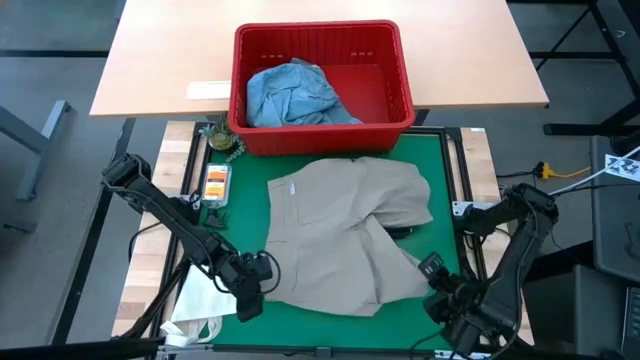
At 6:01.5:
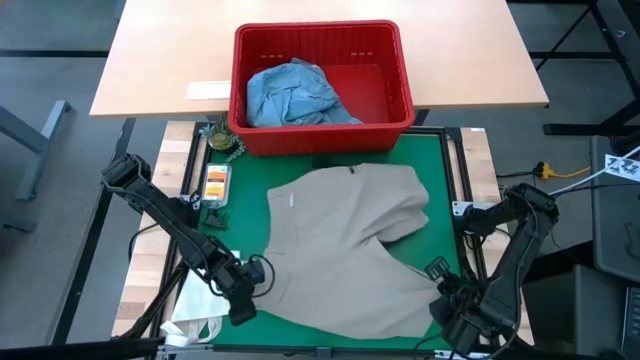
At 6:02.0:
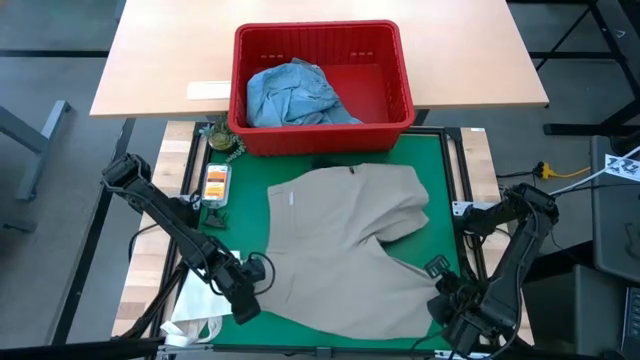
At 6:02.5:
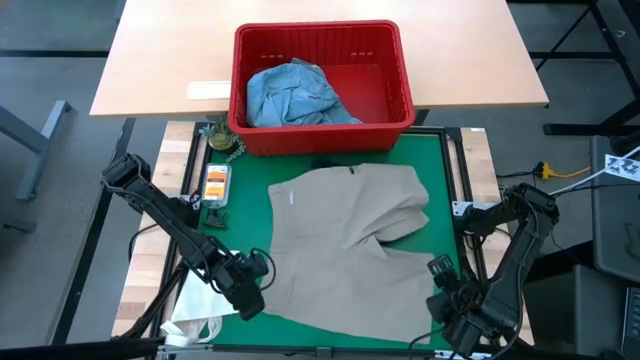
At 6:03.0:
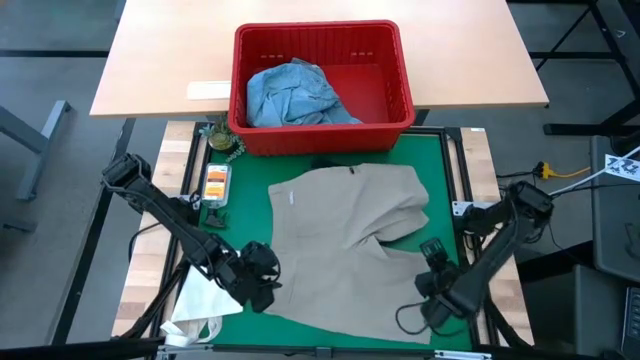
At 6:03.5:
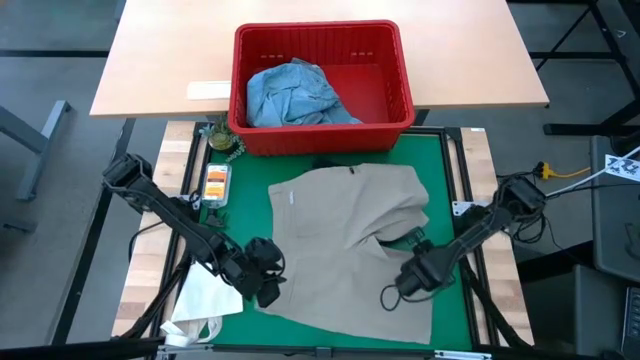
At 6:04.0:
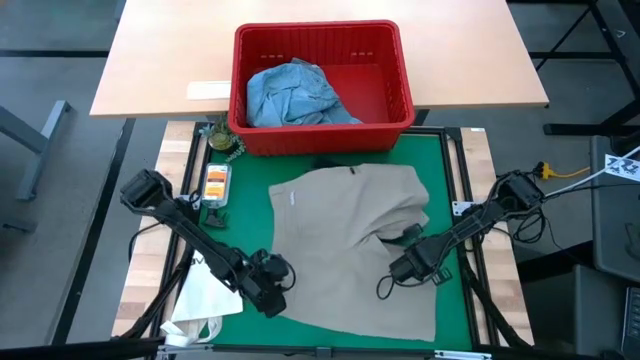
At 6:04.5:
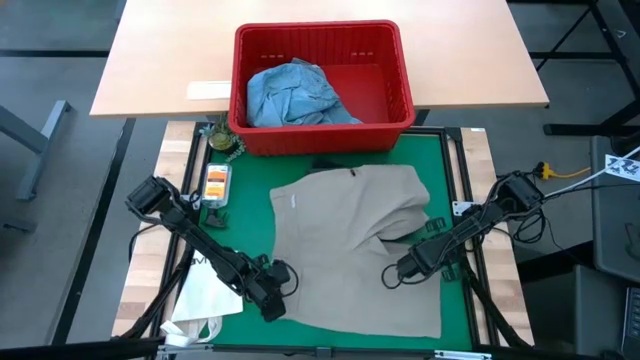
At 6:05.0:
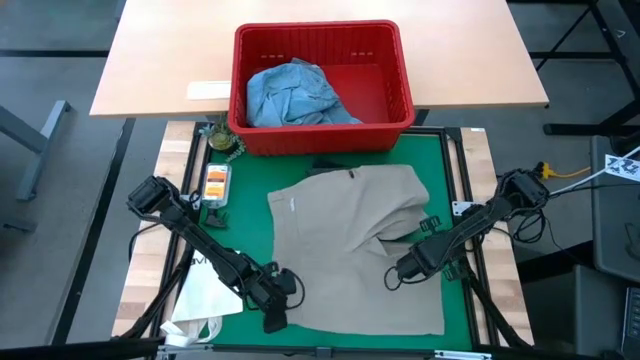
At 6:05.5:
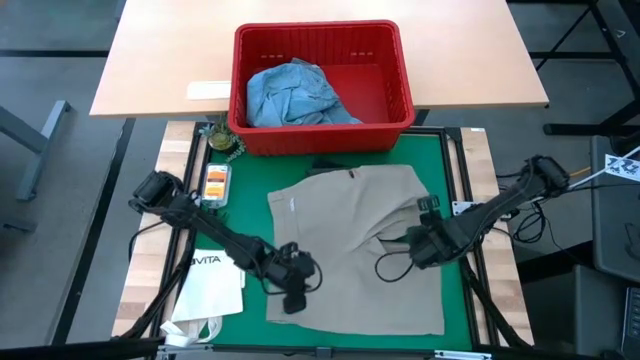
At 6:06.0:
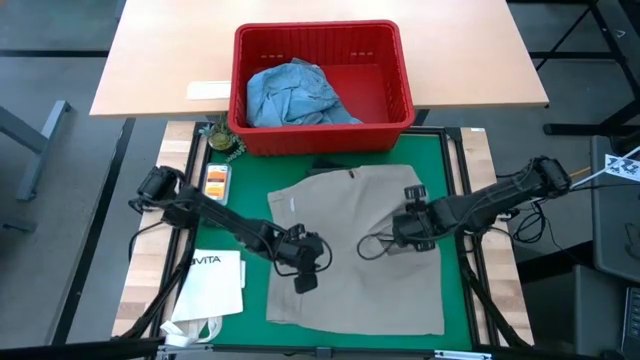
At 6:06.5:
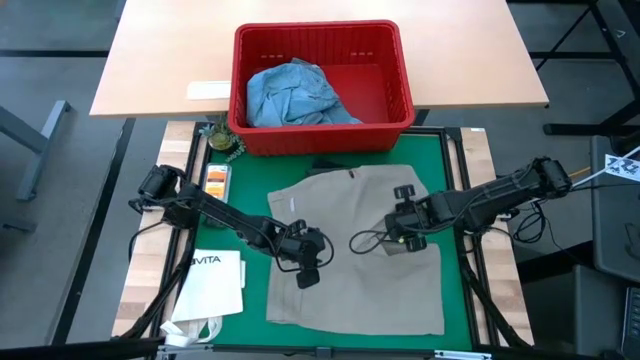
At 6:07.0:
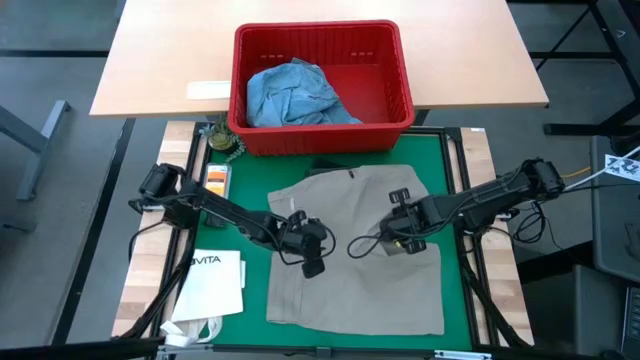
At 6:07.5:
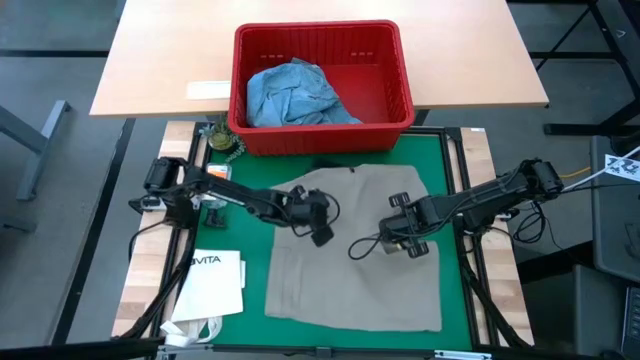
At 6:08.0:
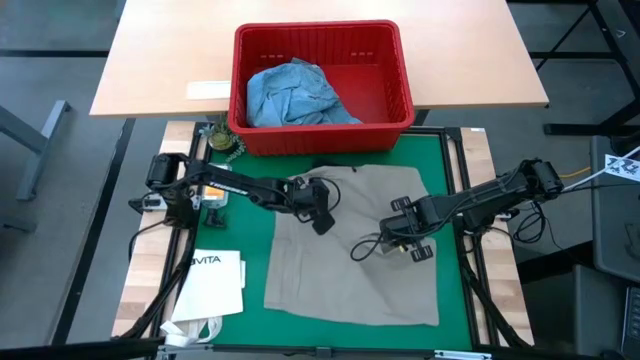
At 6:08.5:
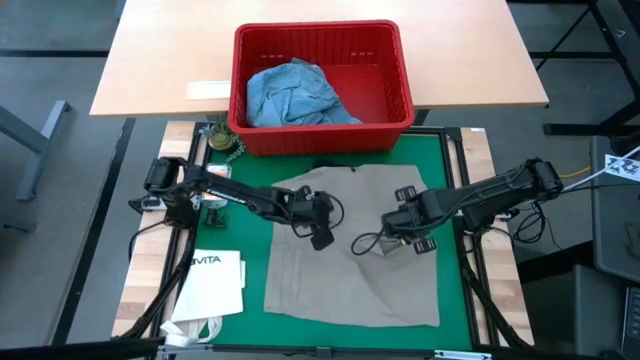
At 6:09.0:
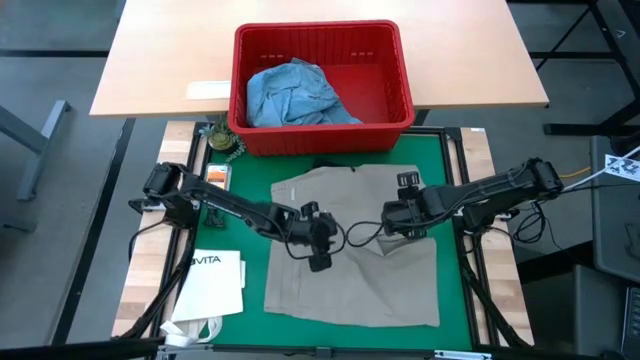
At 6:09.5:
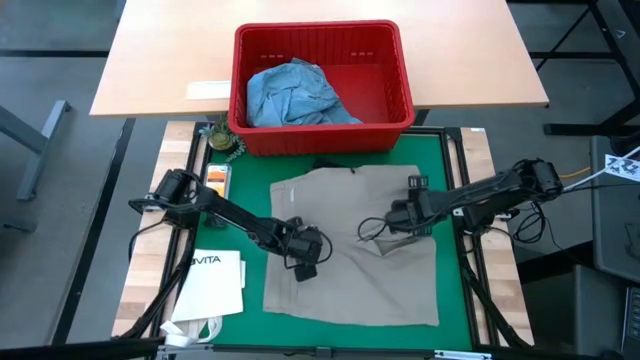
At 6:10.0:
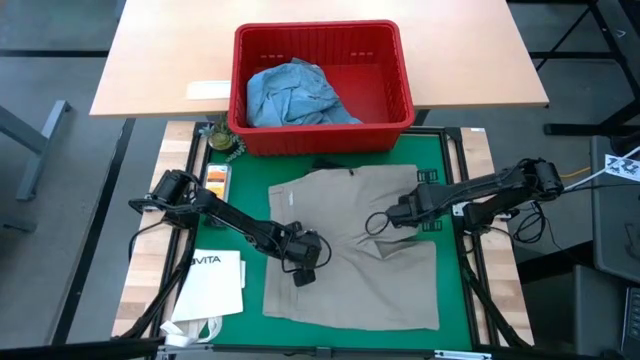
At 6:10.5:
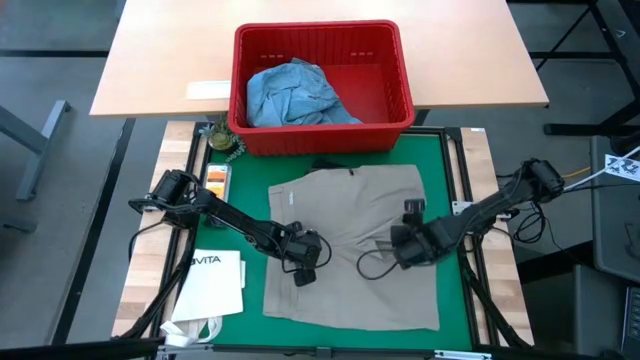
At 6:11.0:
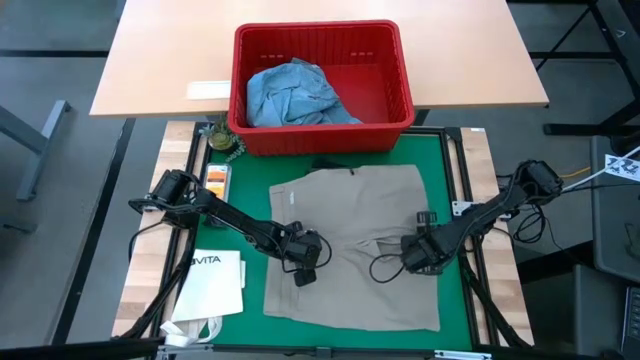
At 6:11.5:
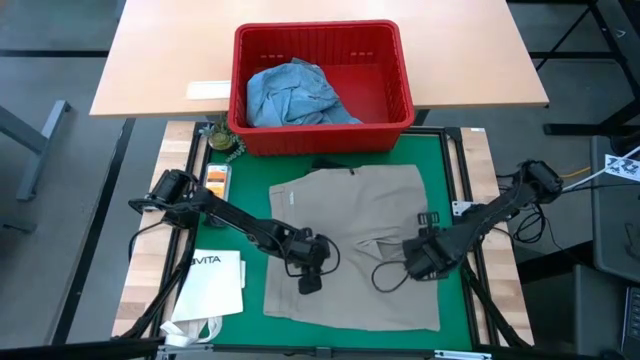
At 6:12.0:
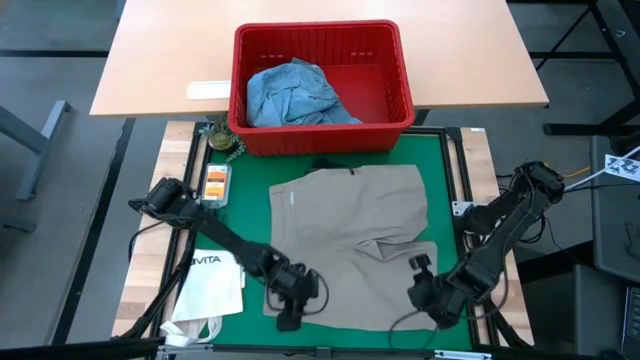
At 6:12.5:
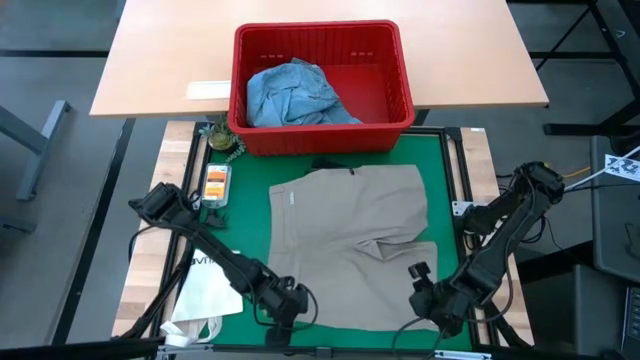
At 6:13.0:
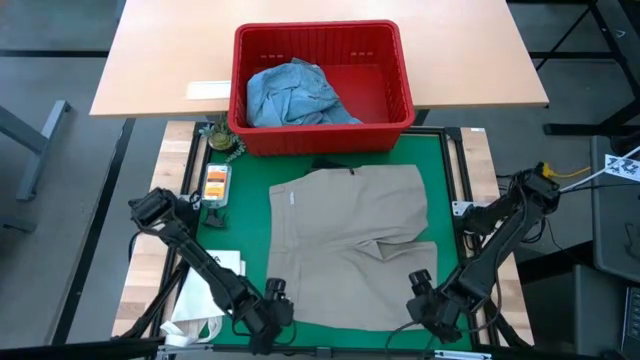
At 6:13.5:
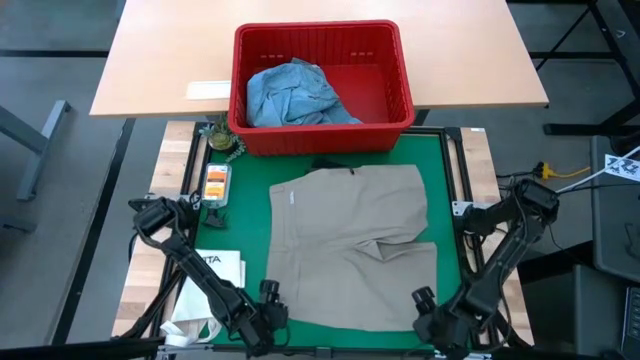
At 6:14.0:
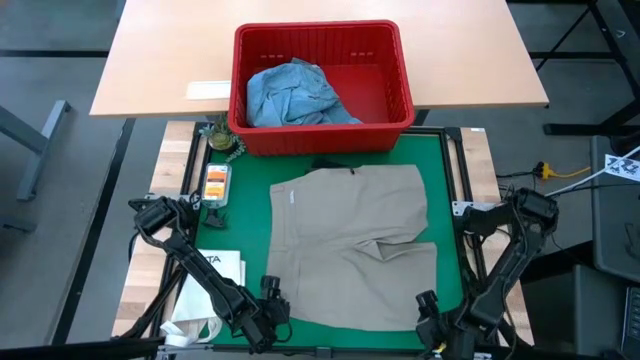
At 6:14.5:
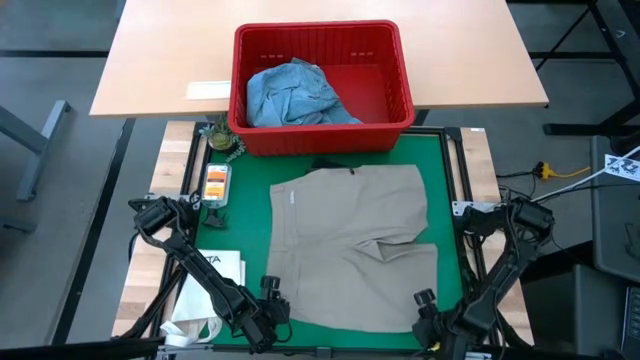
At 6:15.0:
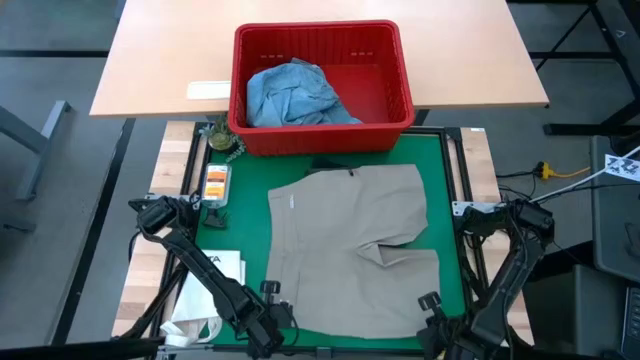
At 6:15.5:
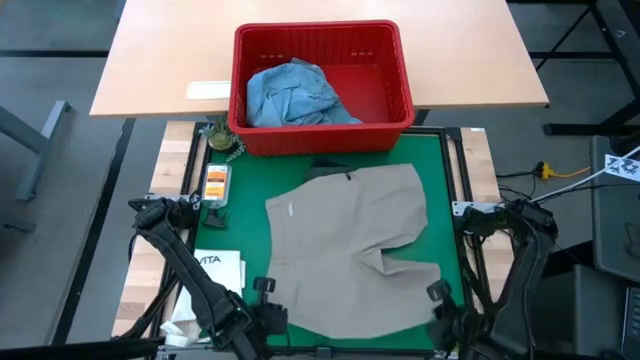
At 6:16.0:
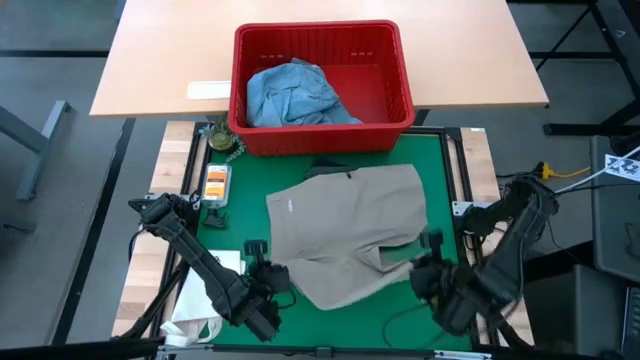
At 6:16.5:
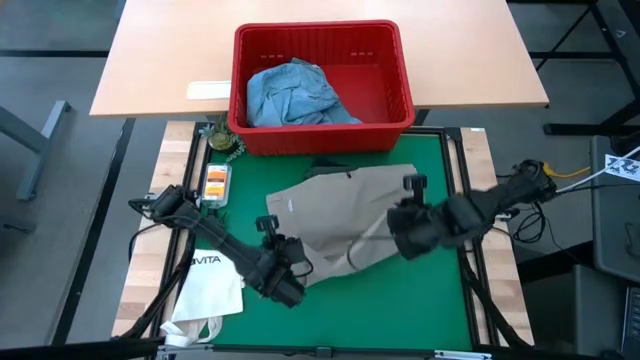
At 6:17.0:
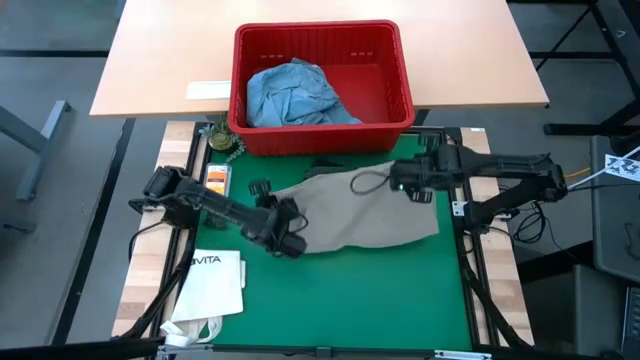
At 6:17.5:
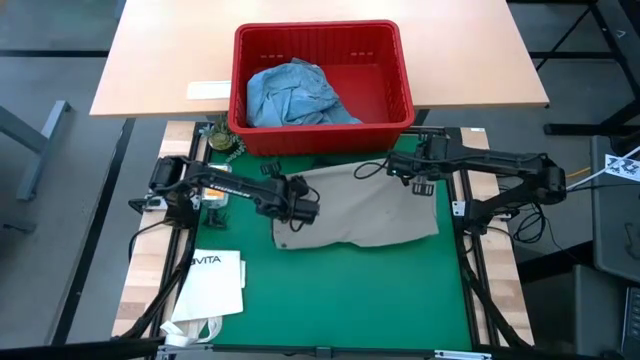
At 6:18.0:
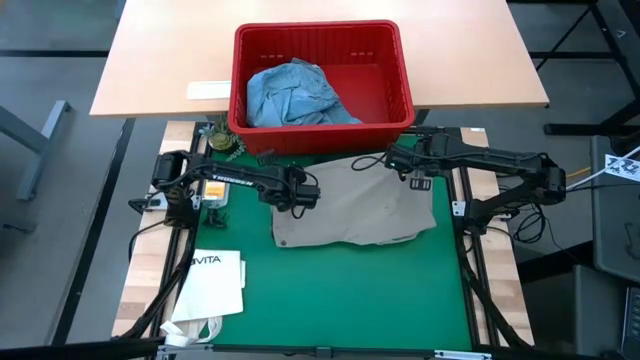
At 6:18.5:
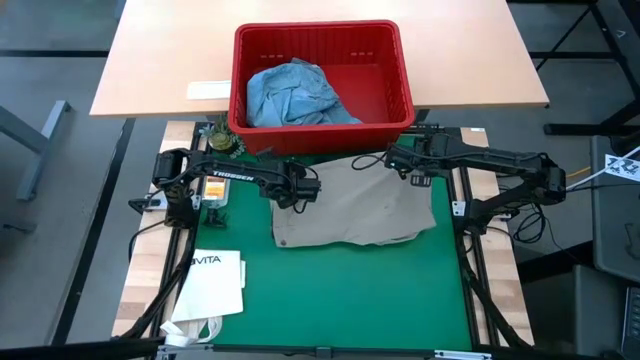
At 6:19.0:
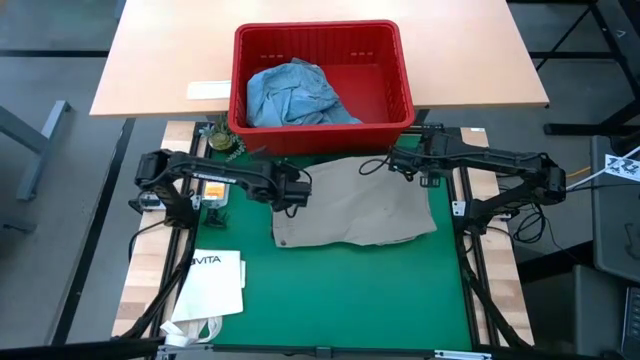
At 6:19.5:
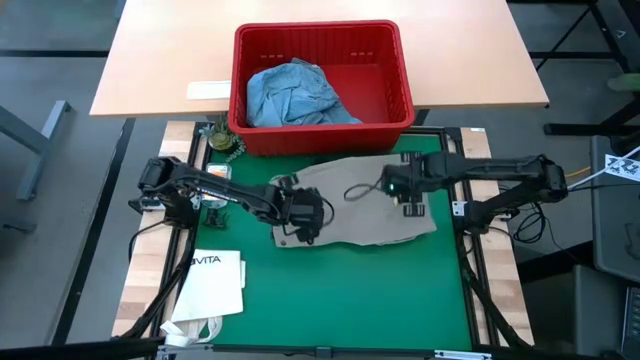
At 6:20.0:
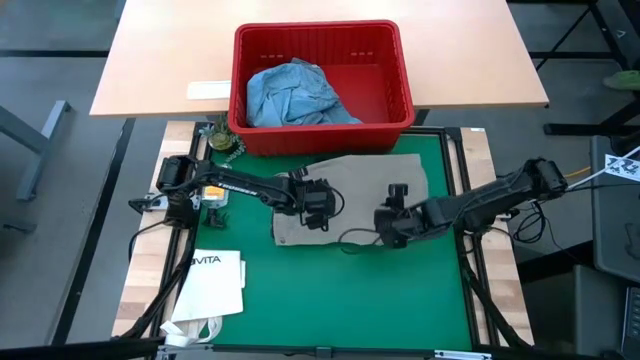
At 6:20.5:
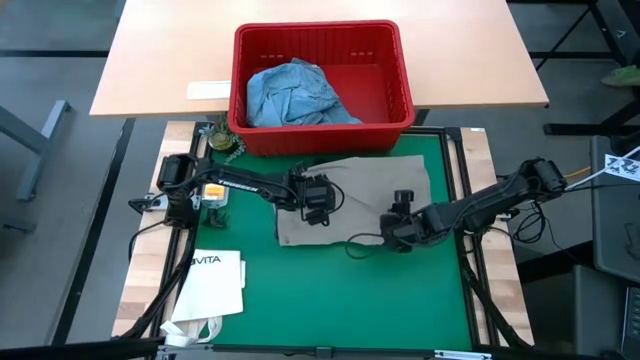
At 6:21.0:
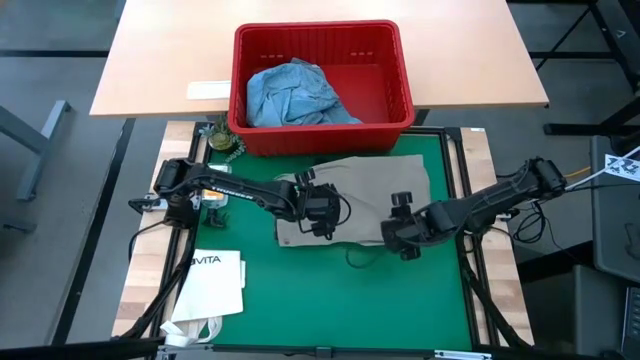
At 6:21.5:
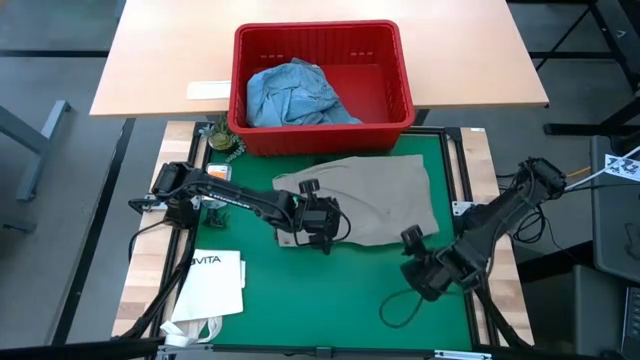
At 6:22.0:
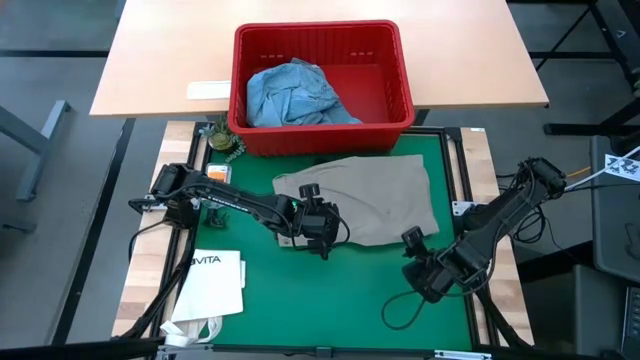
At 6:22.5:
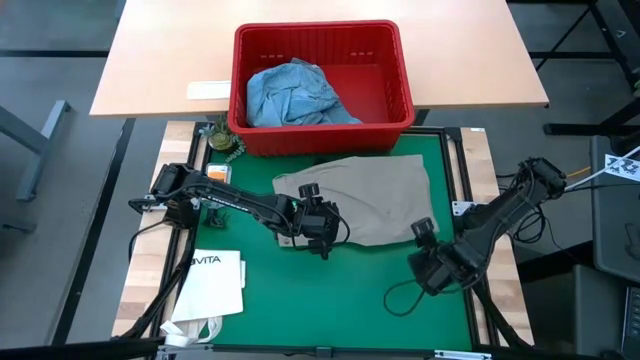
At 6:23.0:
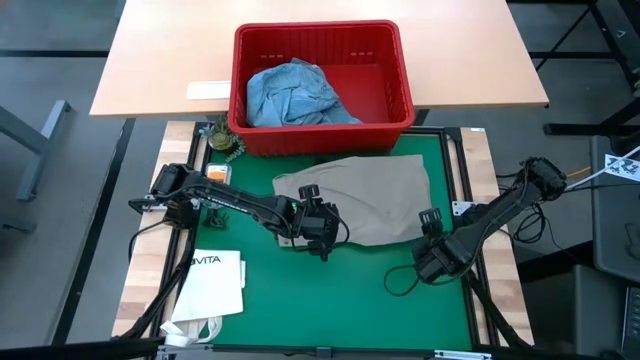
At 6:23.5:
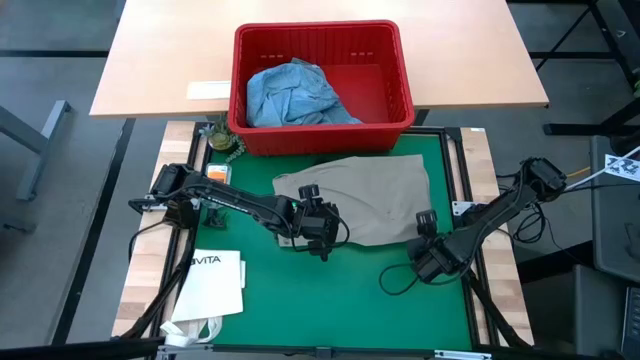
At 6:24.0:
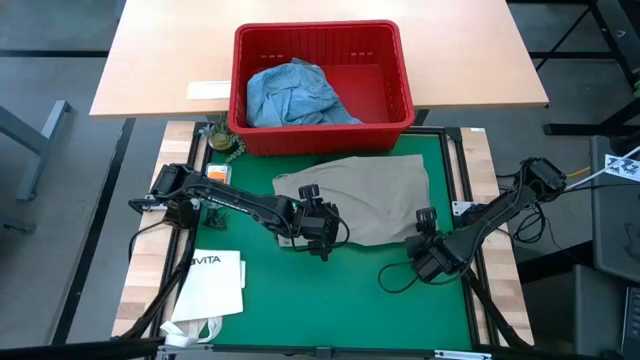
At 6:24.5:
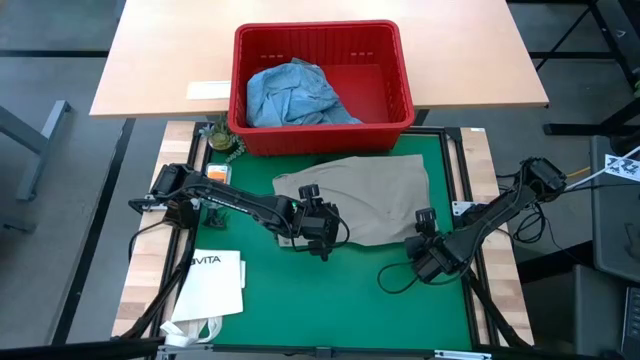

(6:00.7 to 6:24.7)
Task: Fold Laundry from Bin
Fold the gray shorts
